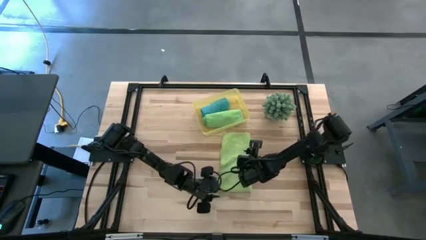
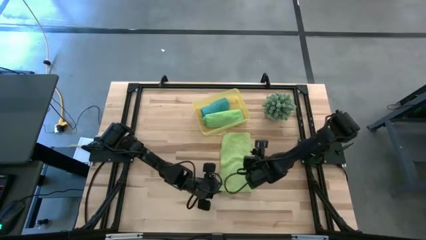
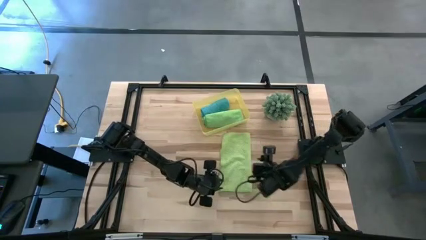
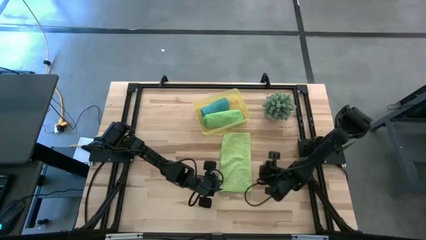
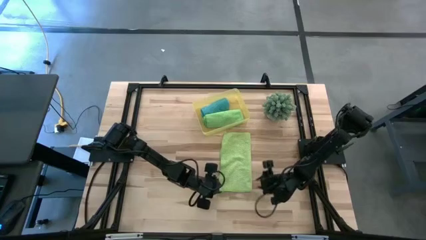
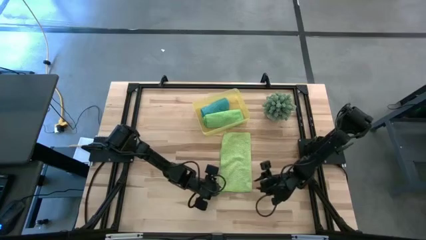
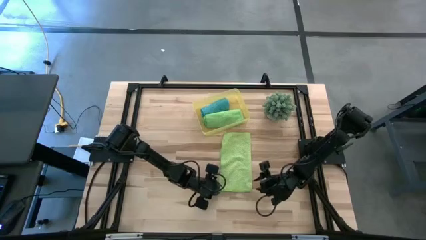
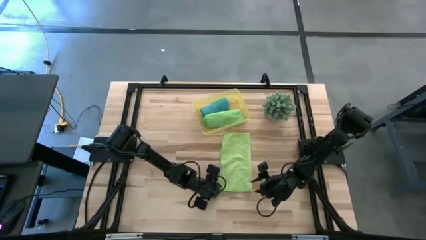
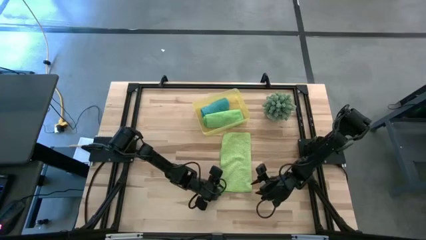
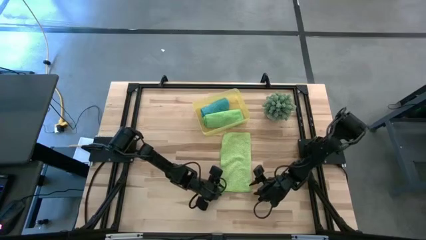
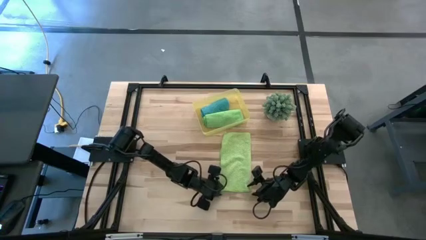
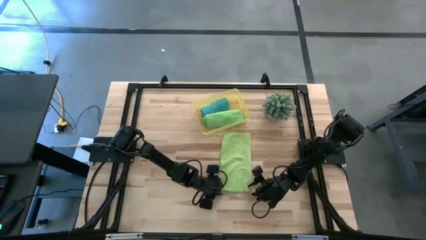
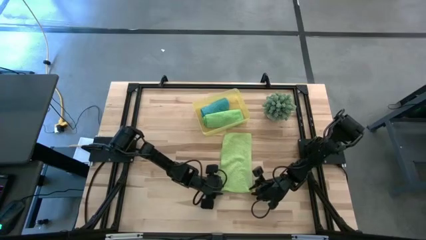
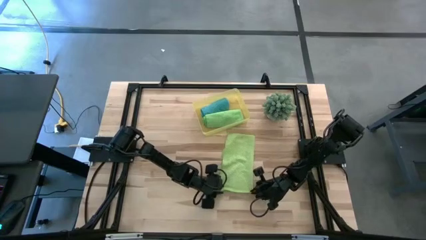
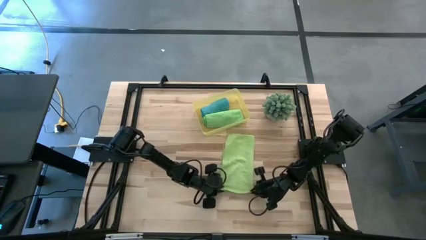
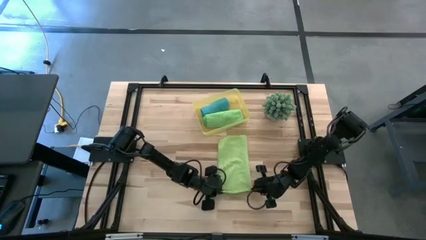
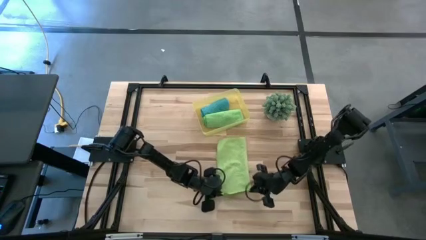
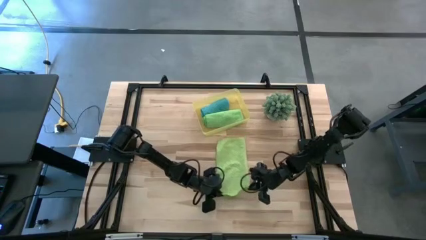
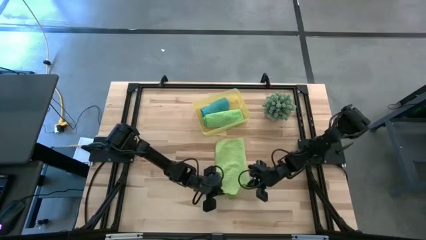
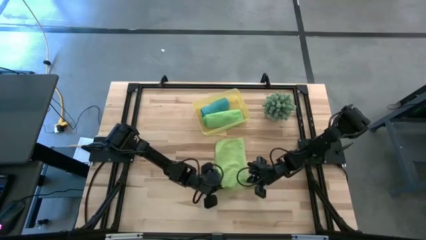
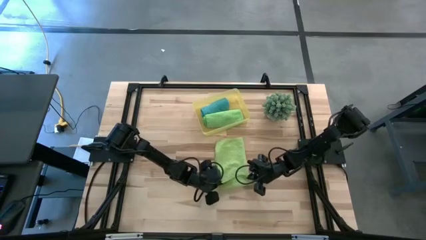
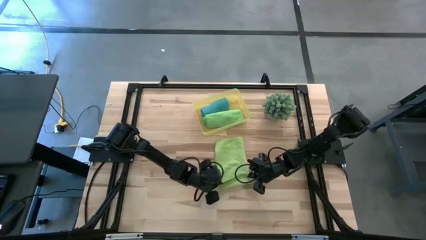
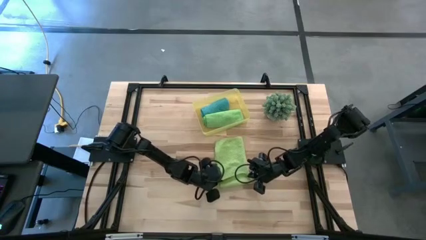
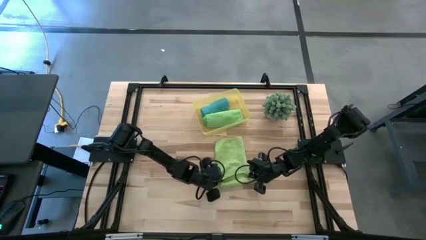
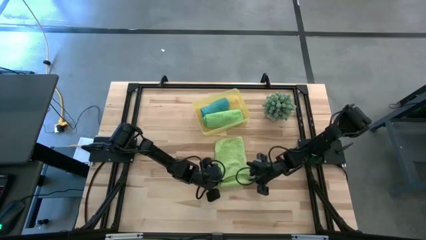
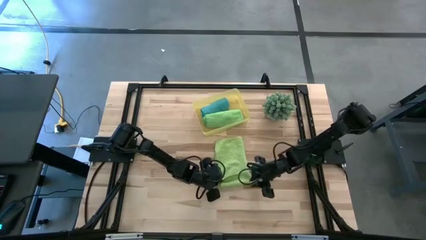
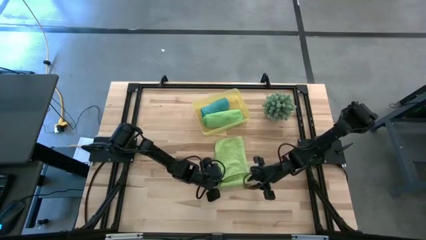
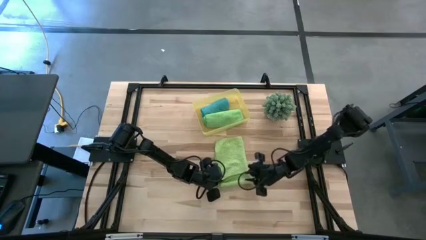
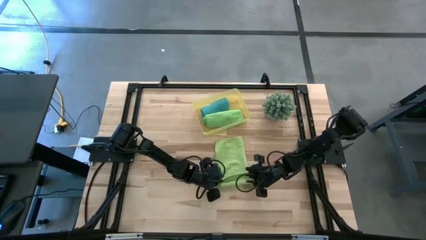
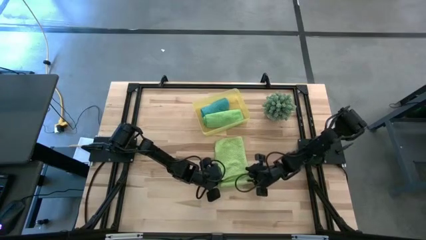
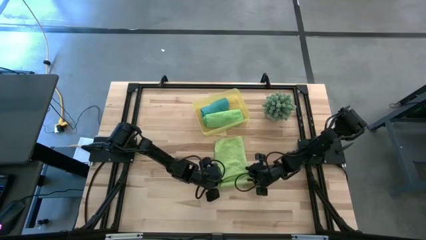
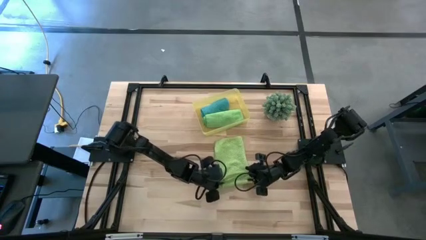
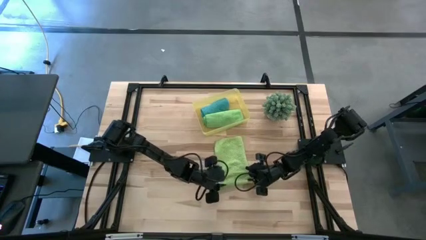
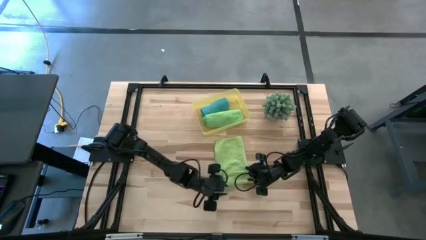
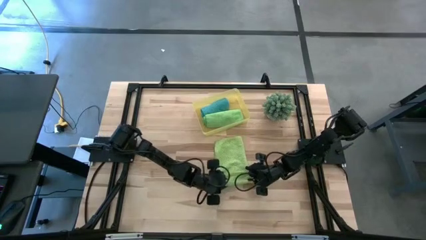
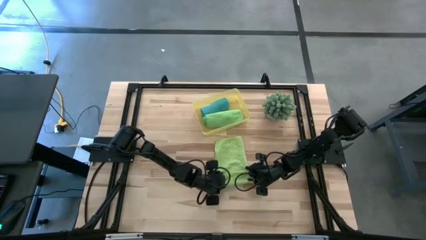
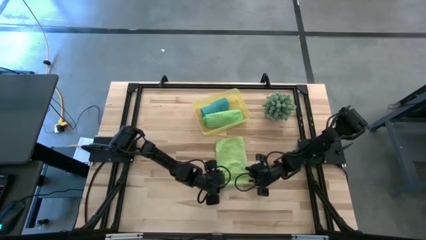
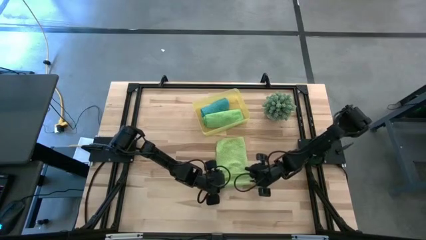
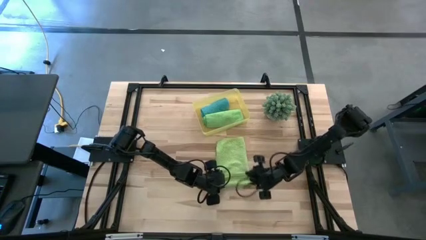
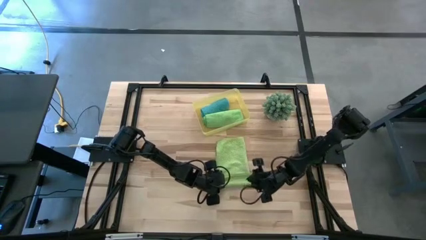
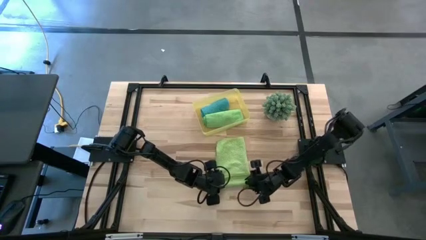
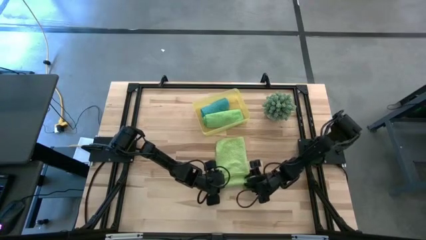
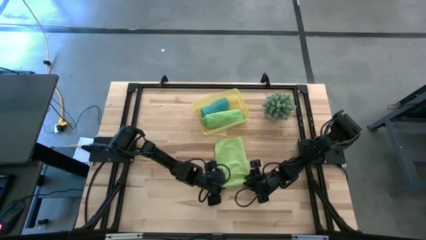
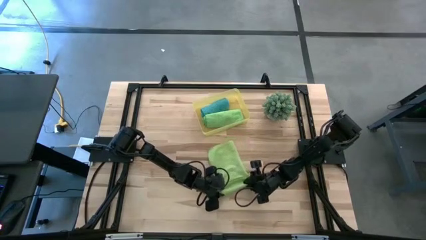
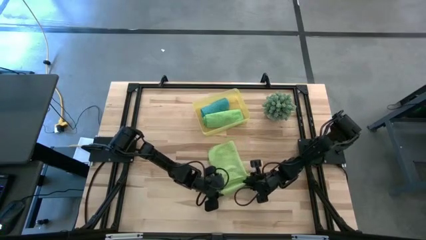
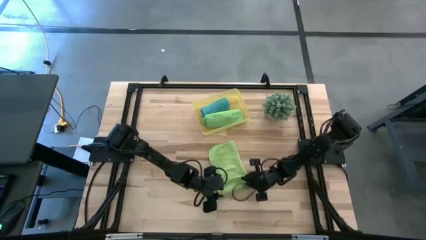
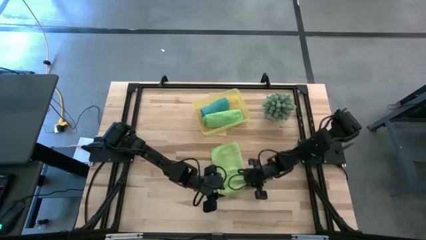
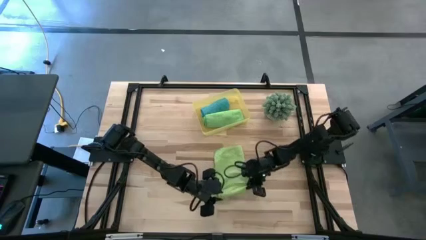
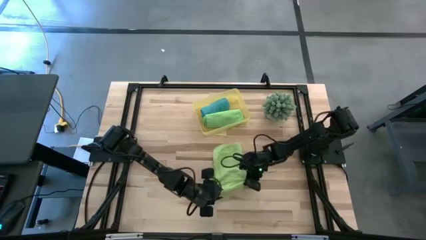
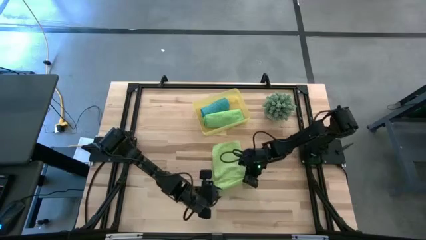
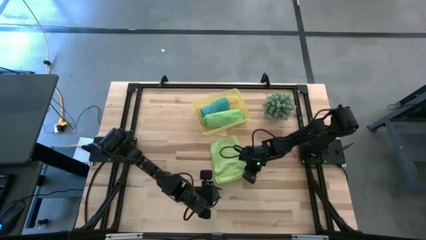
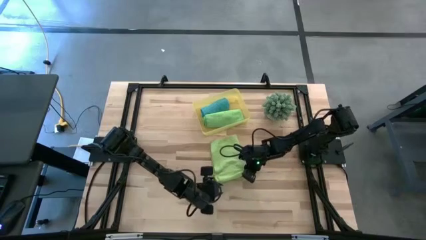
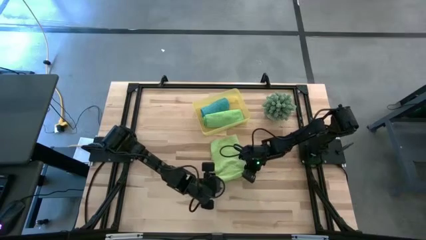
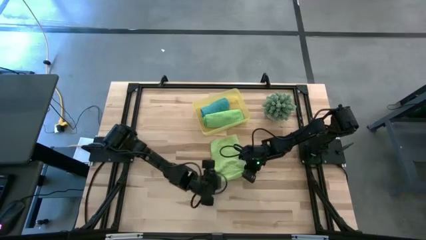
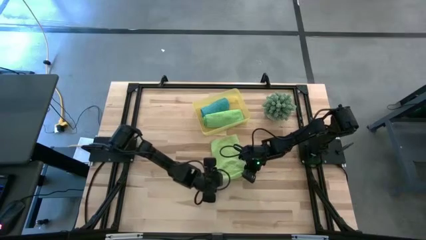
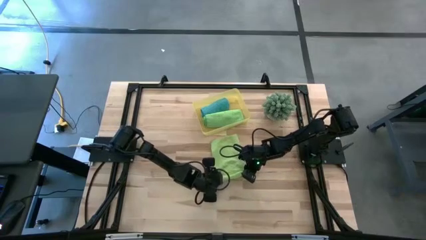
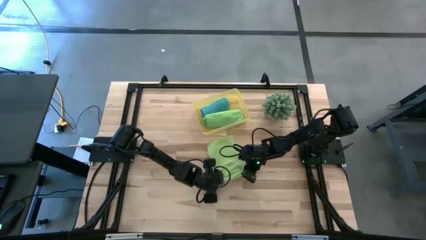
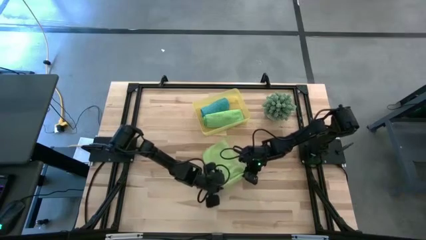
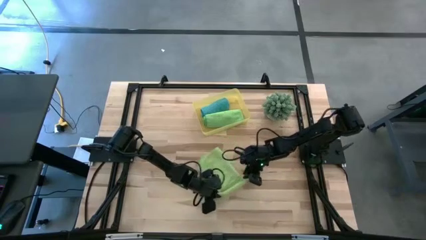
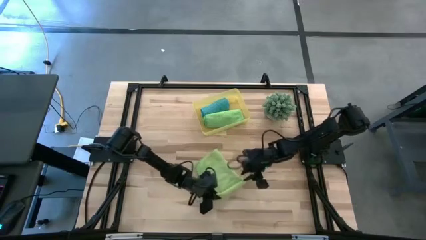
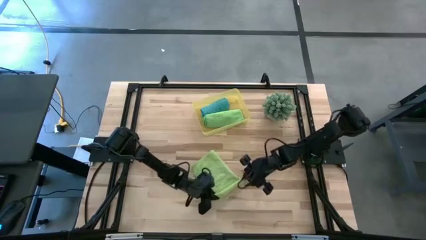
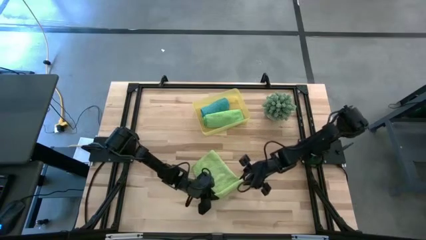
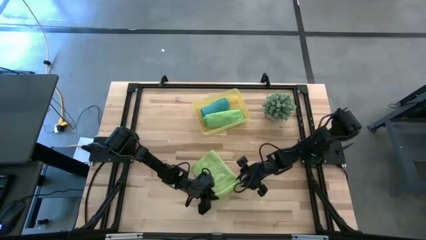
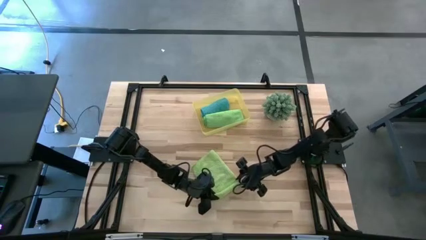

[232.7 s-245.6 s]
Task: Roll microfiber towels into tight, uniform cylinder then place into a basket
Roll the light green microfiber cloth

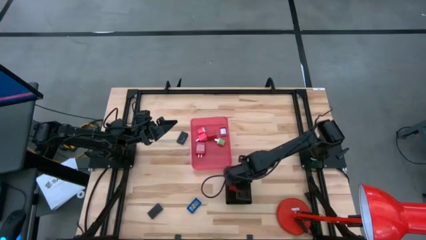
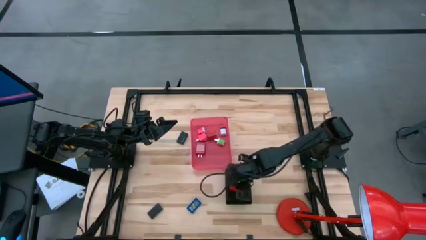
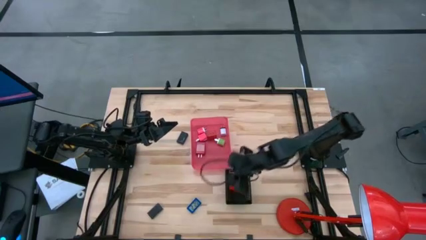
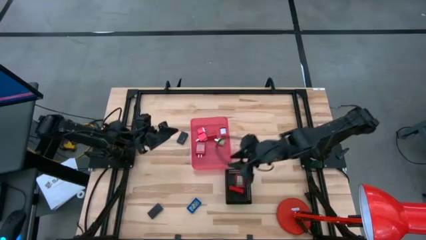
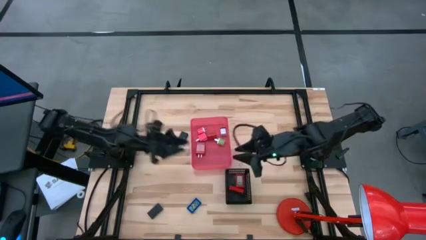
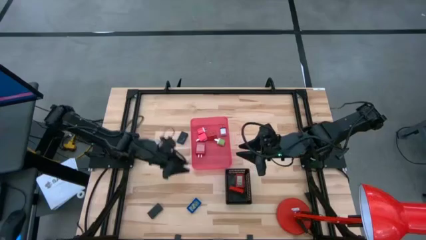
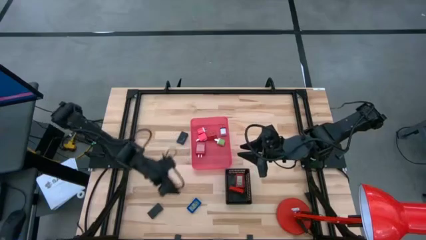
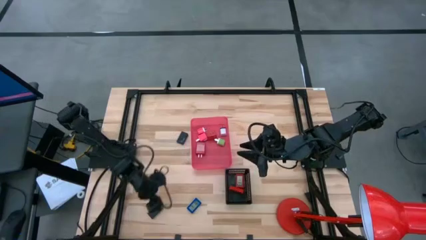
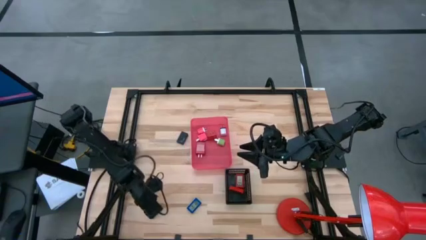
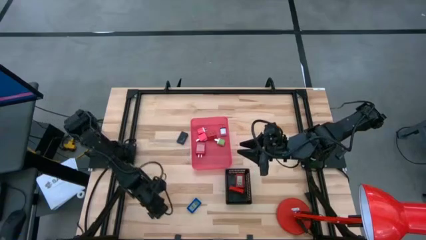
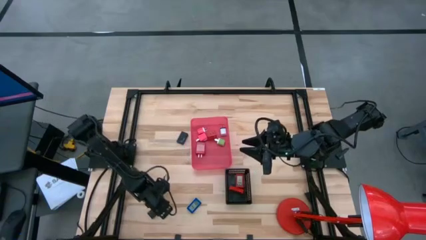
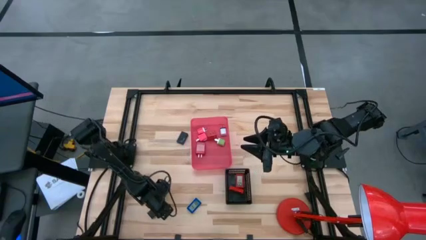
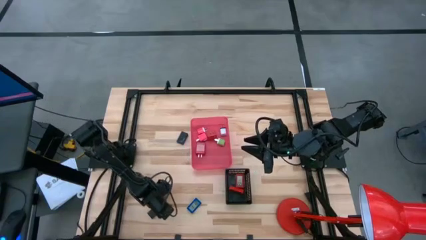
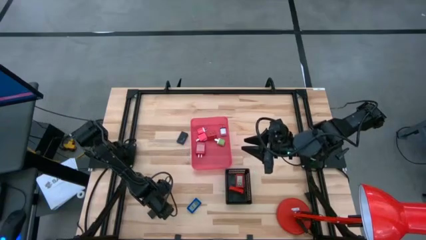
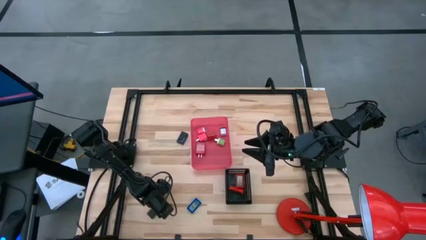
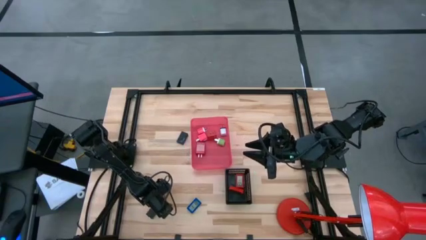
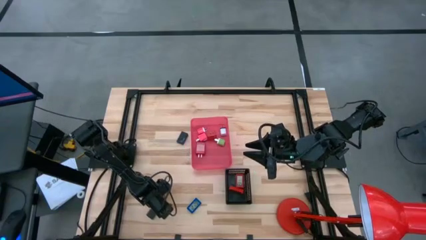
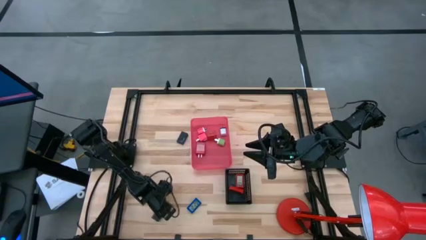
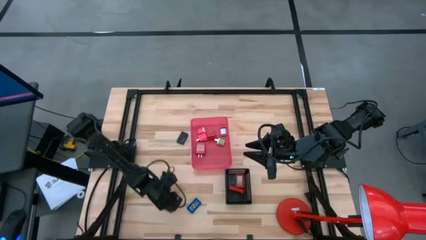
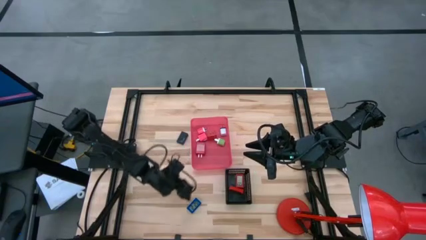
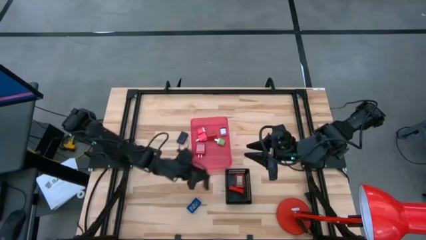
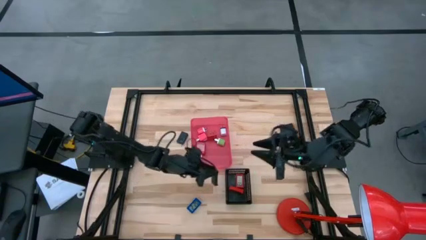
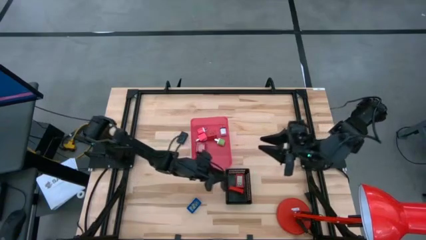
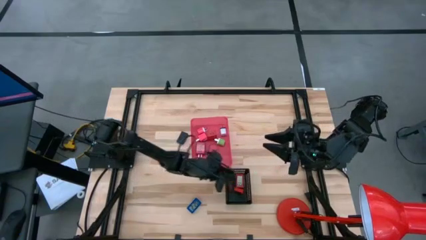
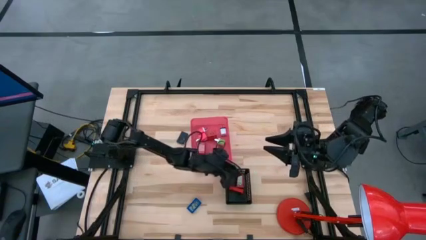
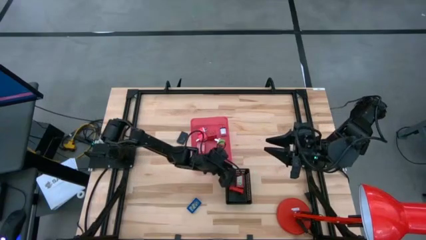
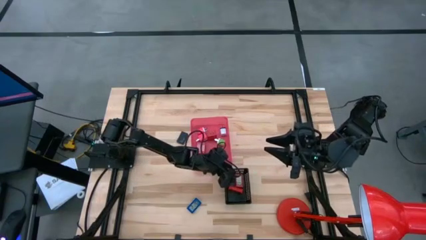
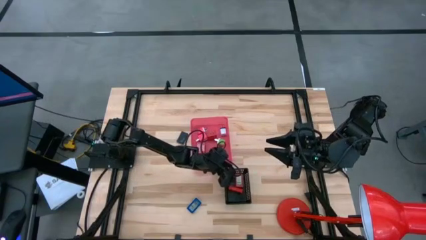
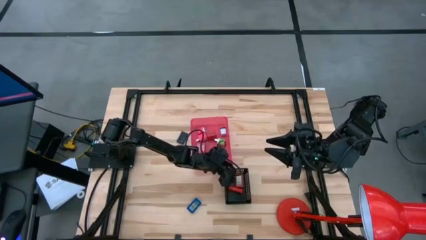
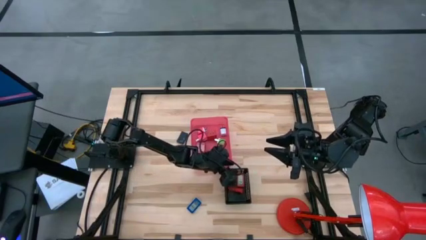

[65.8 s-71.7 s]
Task: Pick & Place Office items
Put the bottom black digital timer into the black bin
